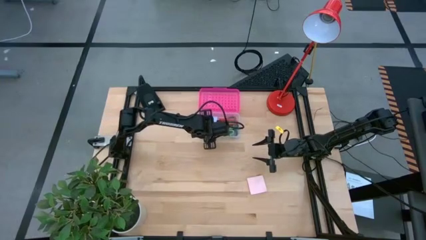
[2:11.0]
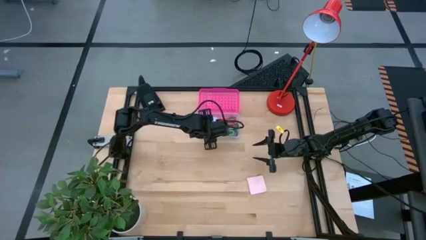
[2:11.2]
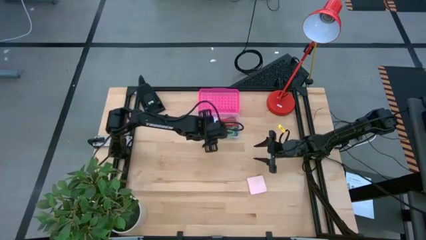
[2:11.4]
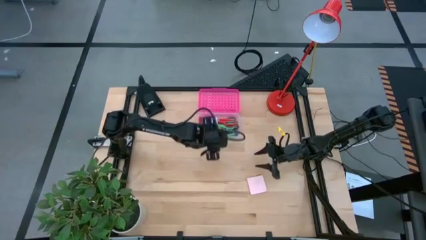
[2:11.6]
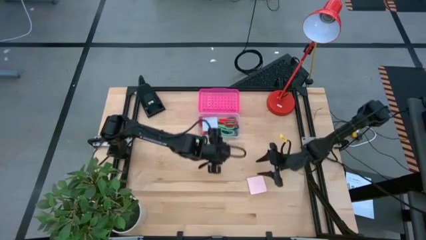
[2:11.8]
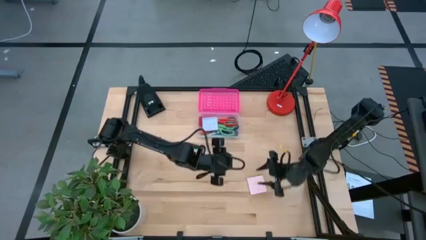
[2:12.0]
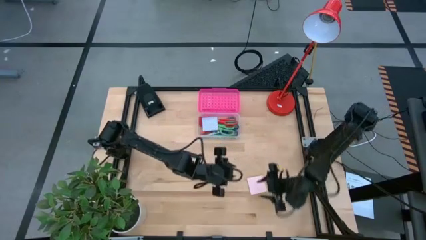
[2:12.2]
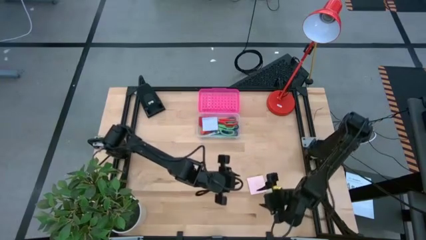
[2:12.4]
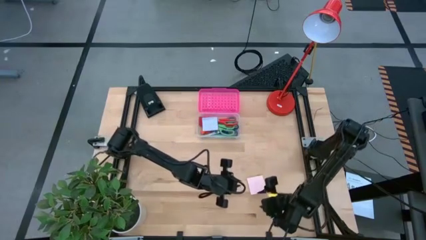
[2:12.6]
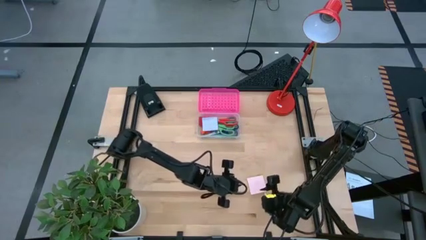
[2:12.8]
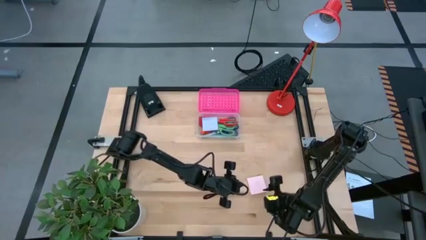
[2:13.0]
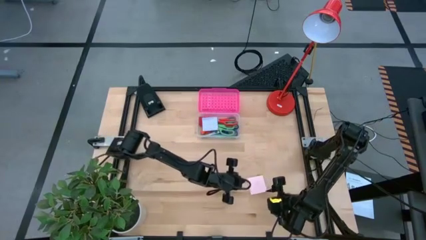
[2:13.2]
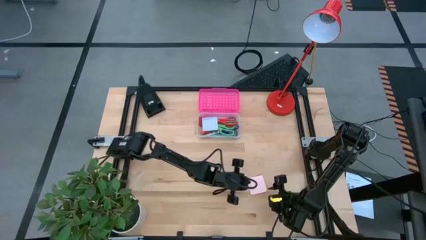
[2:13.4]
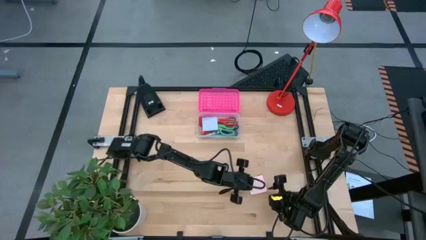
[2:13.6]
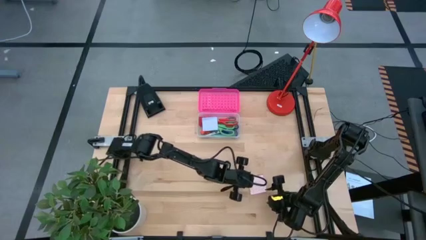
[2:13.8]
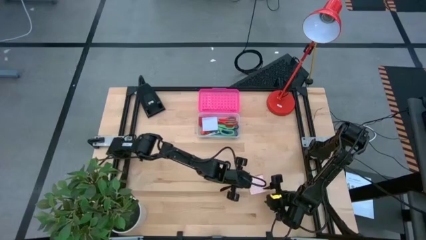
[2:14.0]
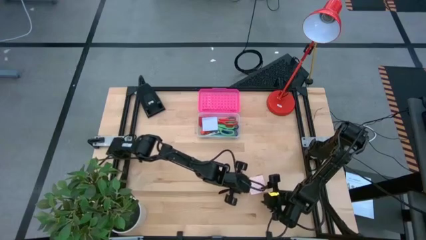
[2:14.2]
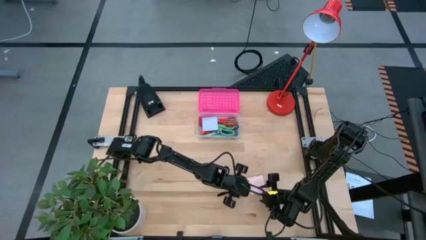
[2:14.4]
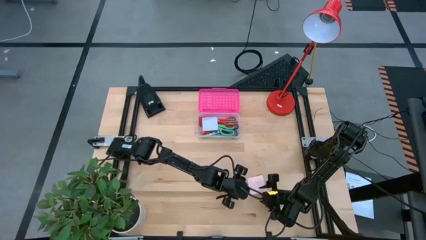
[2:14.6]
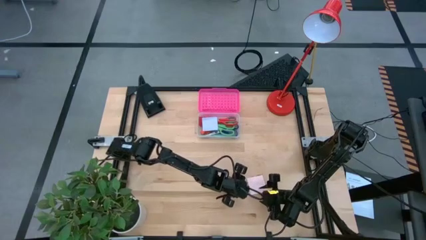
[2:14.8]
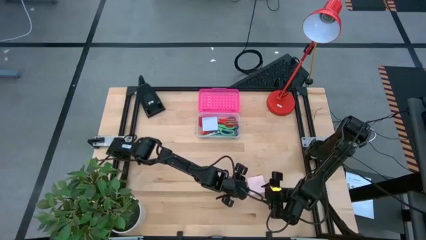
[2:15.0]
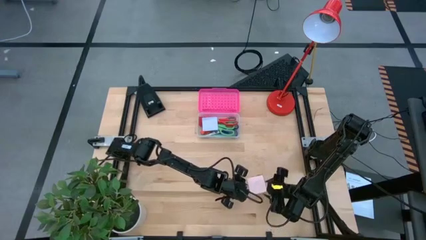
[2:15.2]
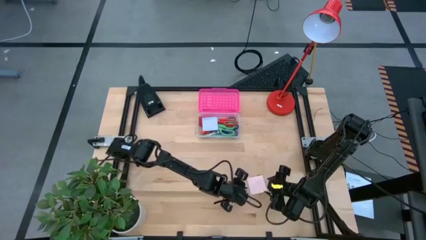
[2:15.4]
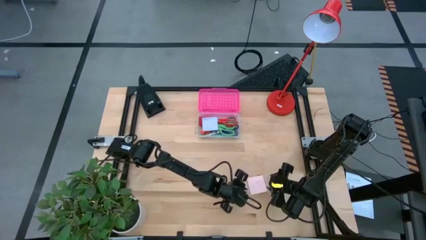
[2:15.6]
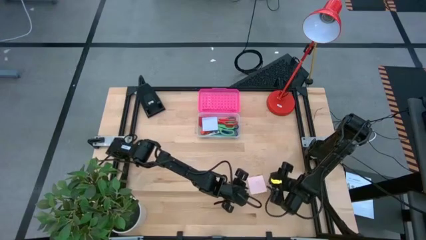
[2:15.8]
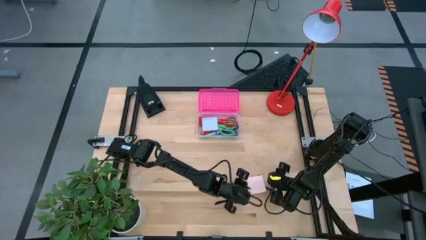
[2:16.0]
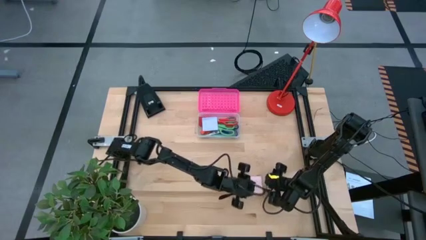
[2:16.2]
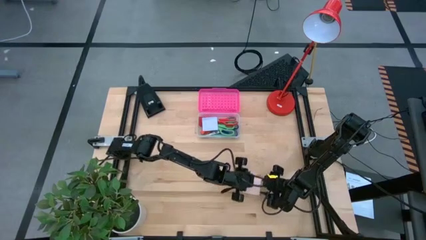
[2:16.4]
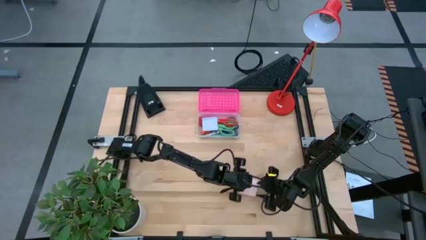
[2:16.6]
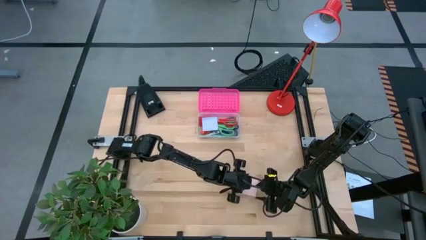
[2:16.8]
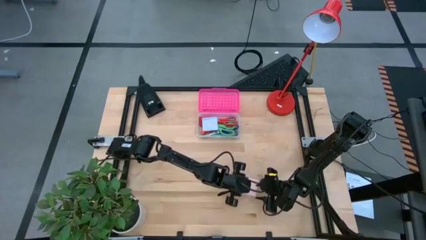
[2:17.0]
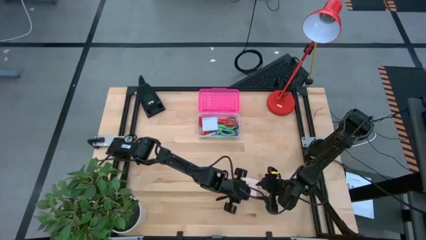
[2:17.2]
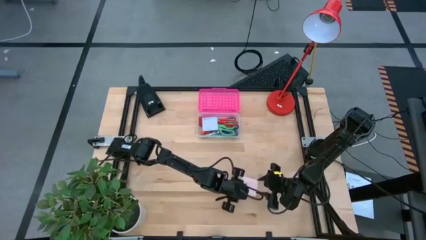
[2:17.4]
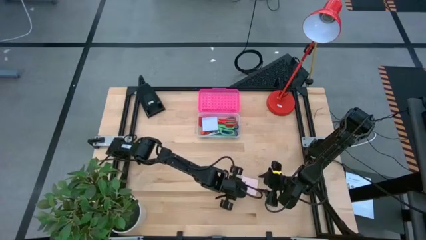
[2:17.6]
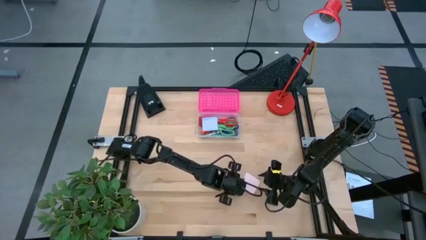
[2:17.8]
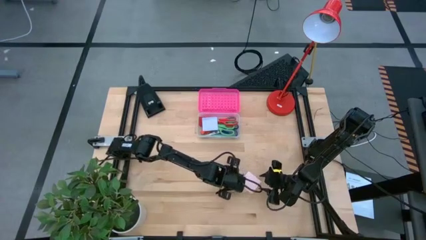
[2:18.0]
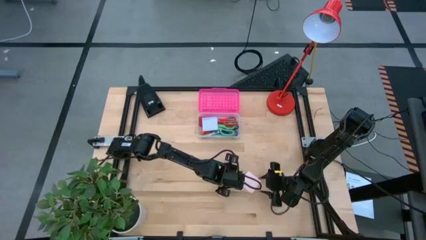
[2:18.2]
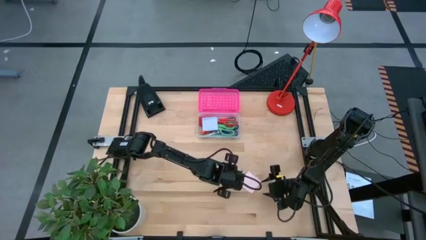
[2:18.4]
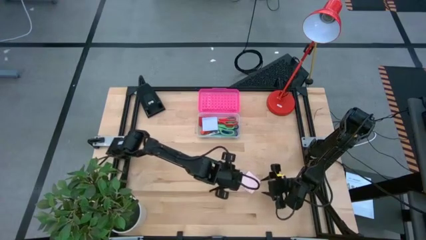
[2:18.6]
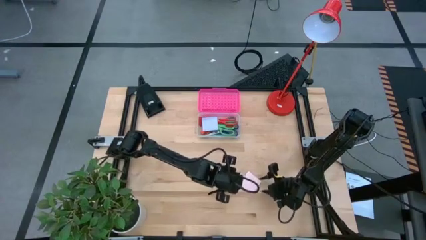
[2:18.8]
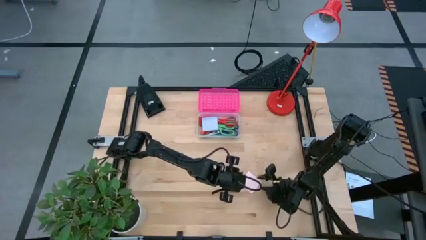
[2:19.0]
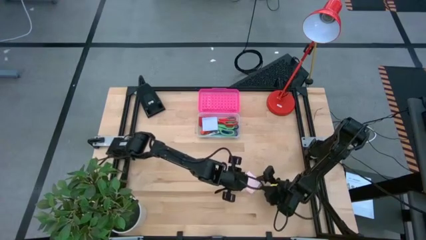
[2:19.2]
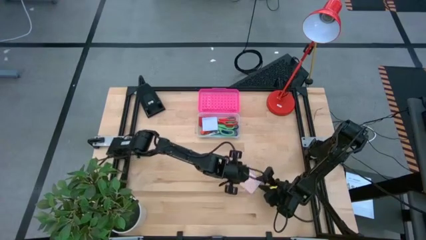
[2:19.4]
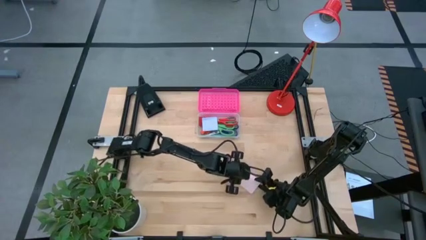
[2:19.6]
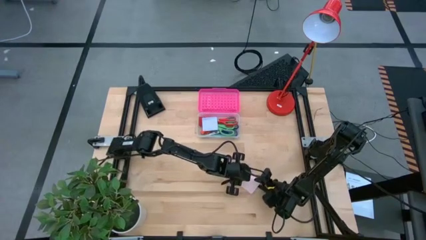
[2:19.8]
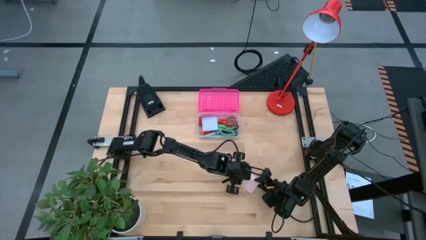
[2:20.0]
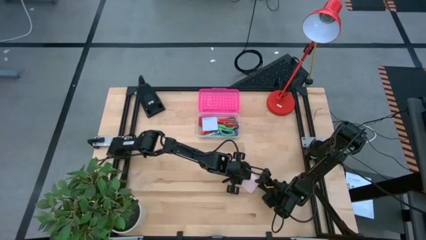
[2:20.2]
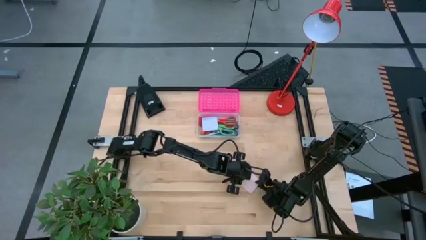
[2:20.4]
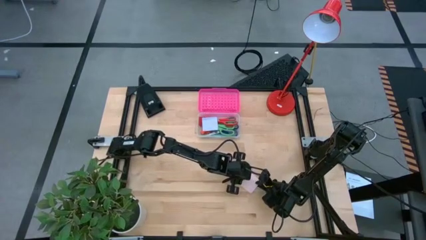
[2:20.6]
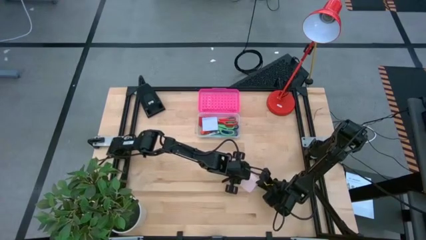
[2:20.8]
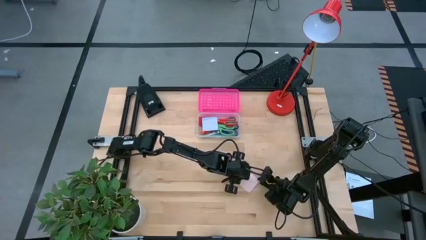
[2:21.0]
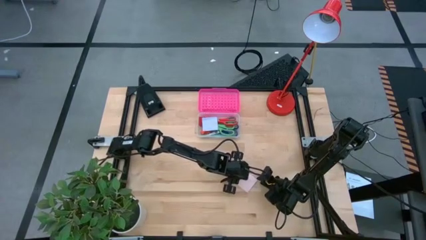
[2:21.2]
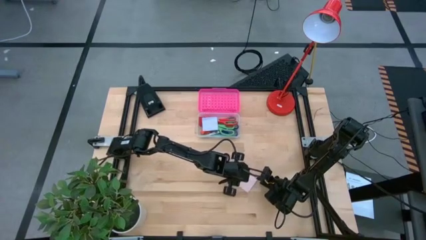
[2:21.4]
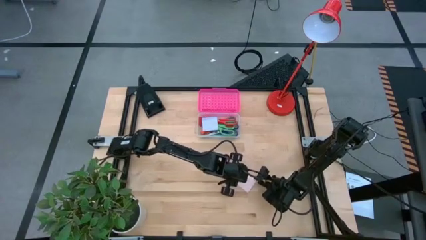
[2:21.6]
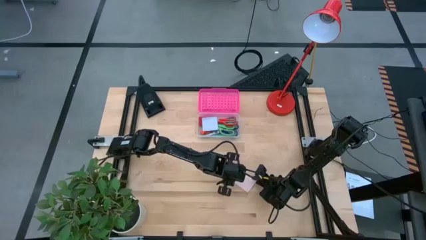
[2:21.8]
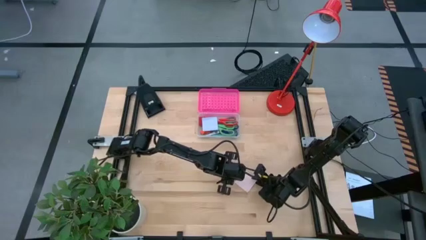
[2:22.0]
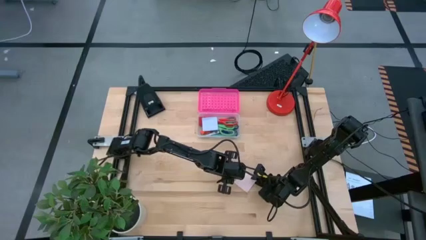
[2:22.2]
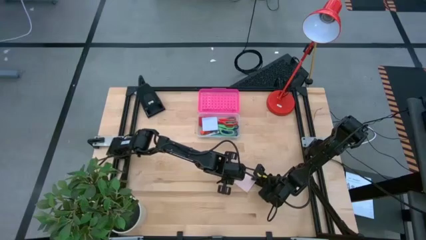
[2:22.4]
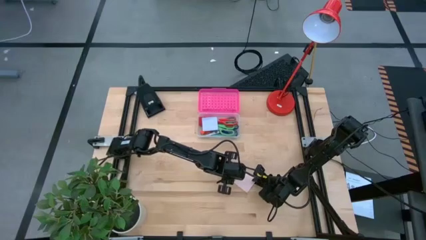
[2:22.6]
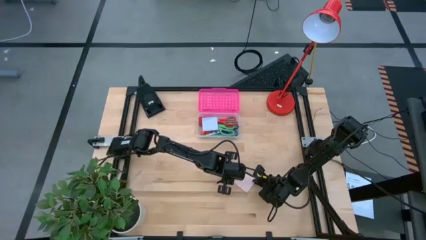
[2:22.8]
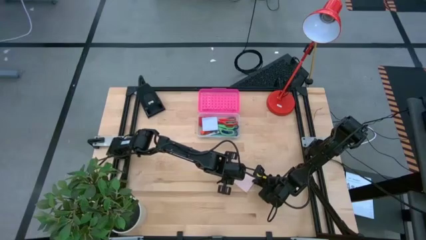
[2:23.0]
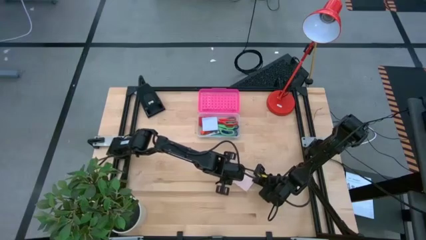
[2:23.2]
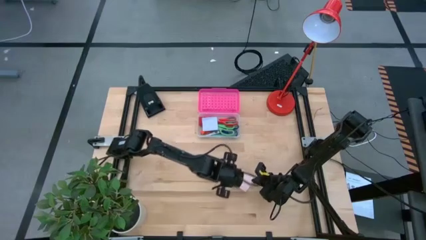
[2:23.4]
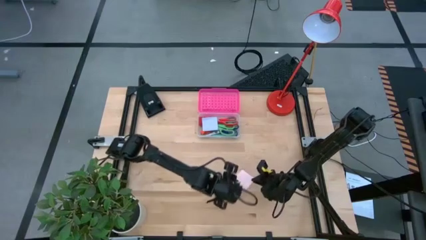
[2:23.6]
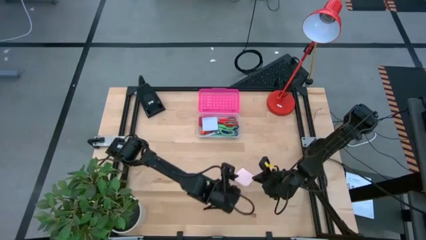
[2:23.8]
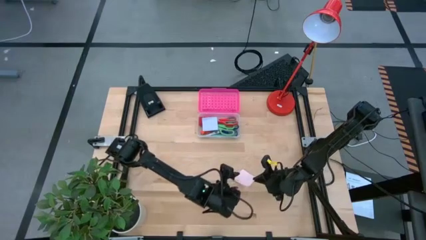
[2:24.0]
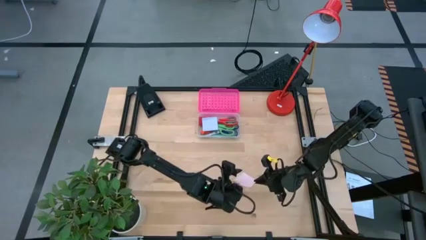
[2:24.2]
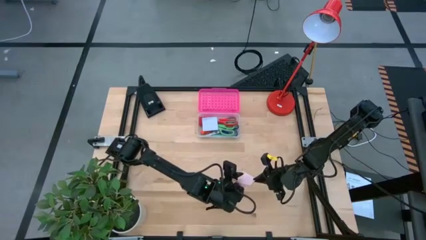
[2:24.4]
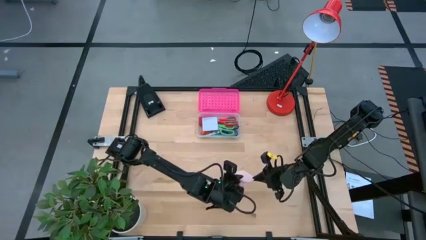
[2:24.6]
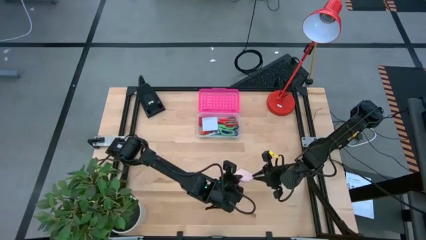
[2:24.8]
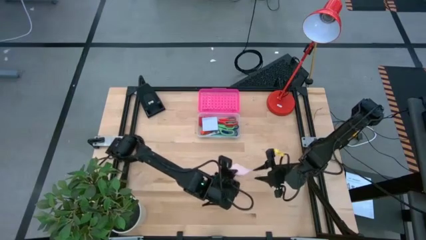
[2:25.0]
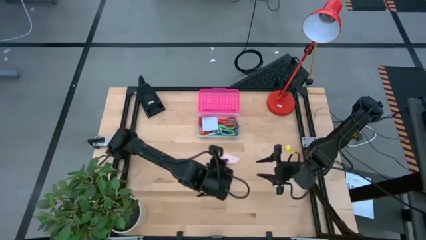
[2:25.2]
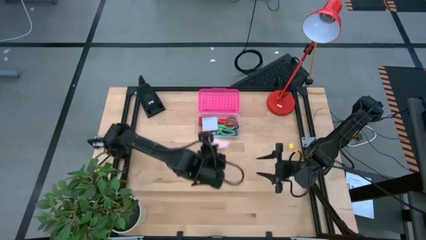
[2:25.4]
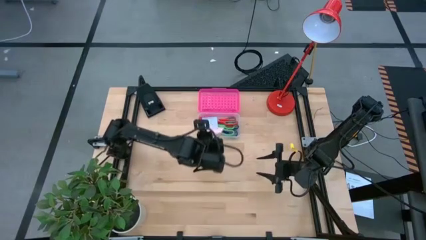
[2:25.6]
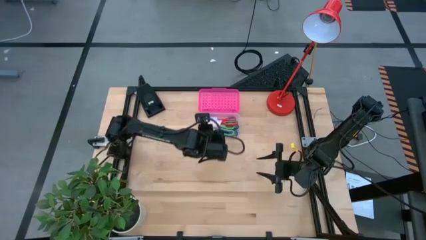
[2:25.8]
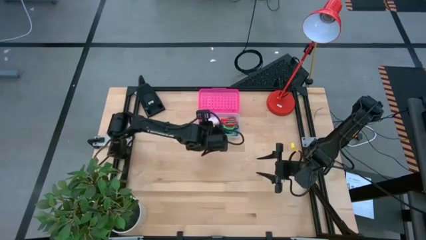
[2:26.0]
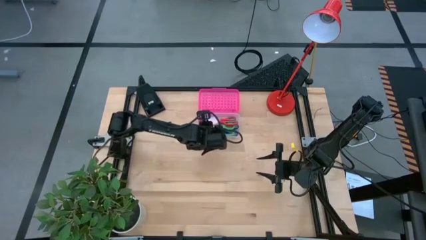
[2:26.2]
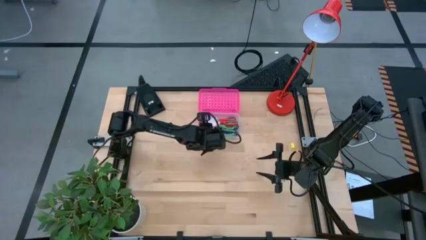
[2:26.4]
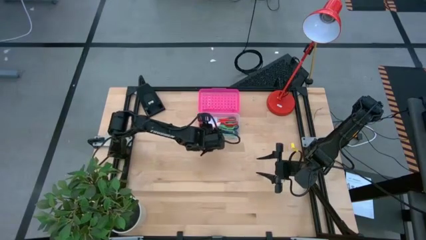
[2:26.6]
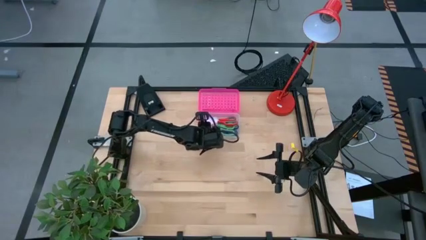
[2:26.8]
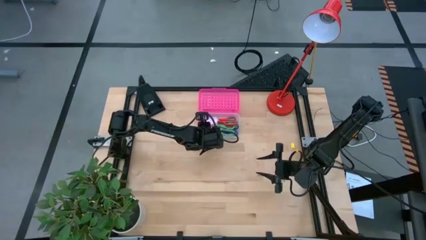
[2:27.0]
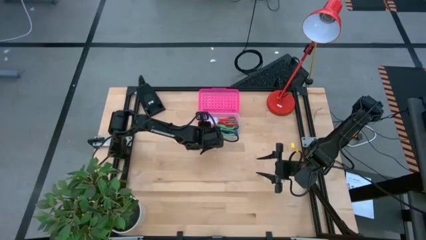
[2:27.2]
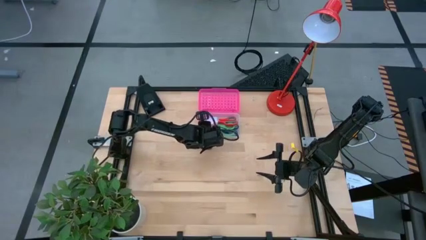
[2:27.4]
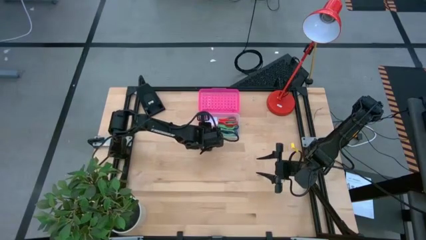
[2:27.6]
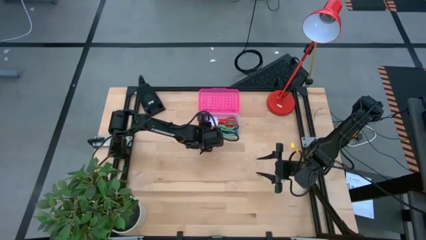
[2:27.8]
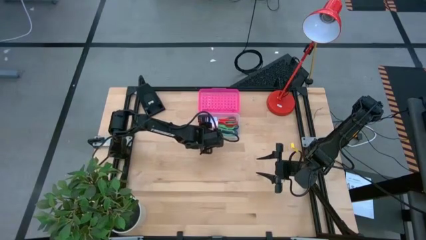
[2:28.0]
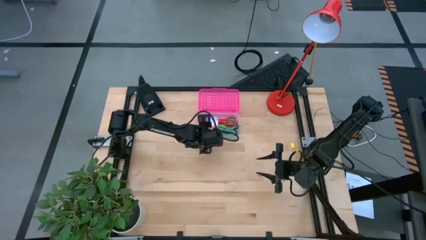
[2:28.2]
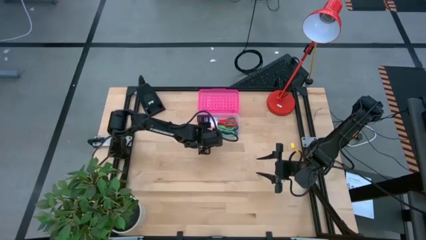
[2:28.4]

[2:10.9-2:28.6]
Task: Pack school essentials
Put the pink sticky notes into the supply box
